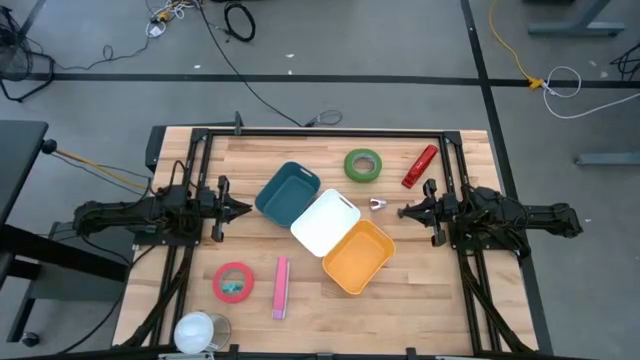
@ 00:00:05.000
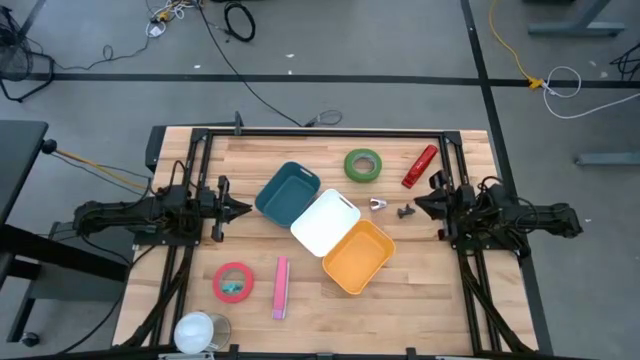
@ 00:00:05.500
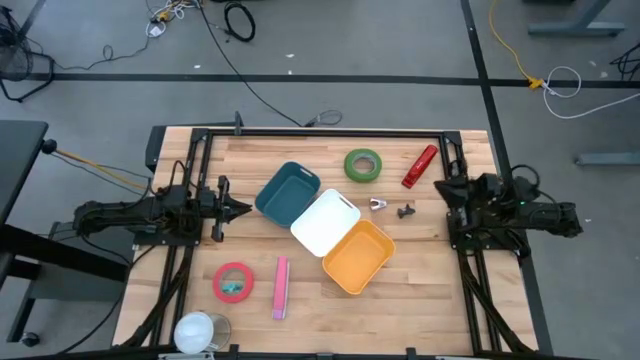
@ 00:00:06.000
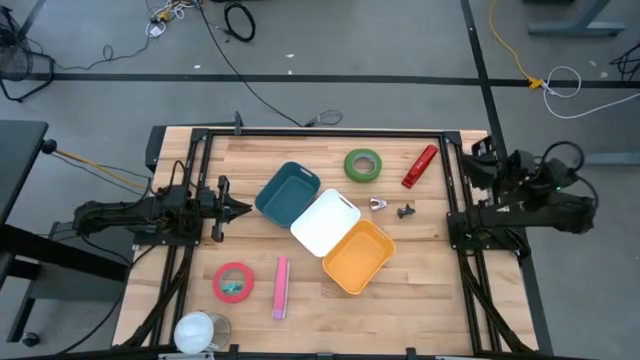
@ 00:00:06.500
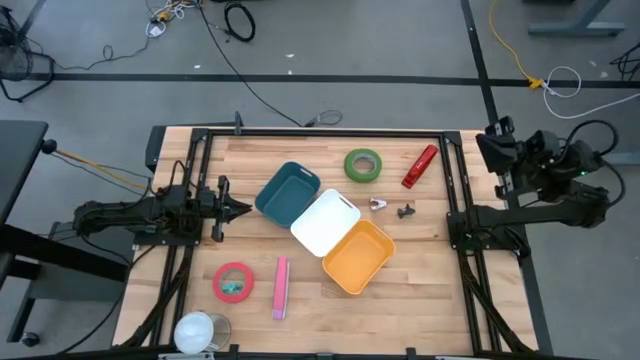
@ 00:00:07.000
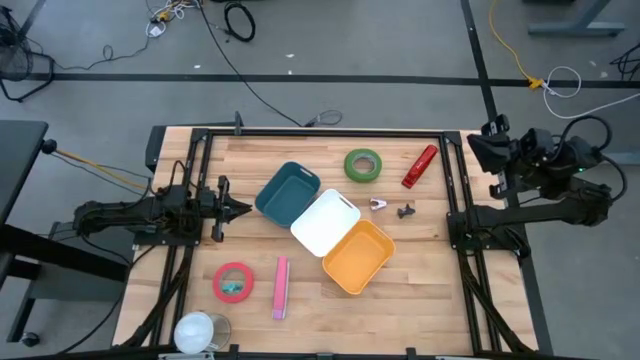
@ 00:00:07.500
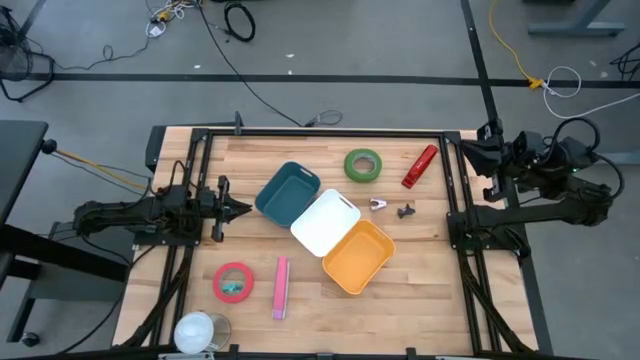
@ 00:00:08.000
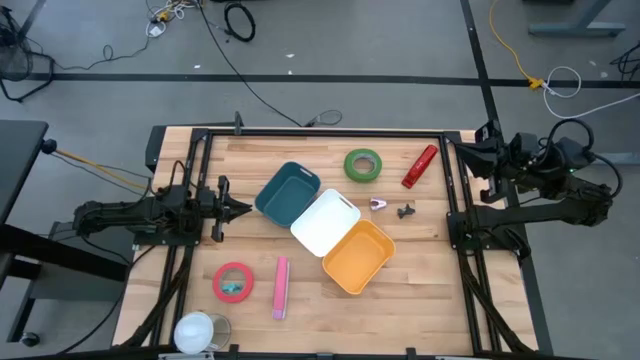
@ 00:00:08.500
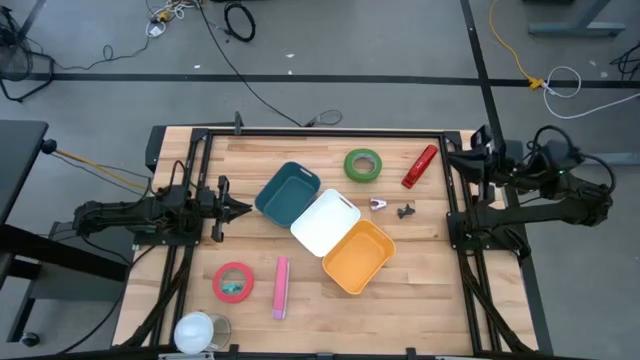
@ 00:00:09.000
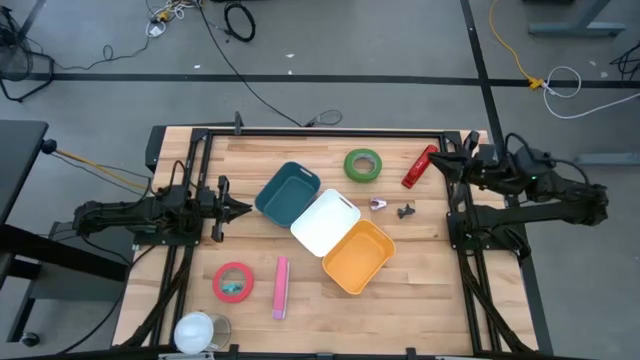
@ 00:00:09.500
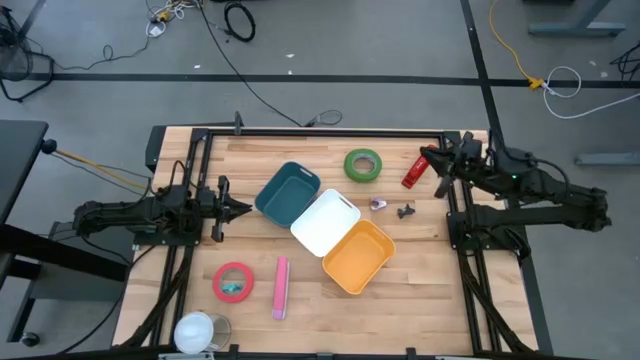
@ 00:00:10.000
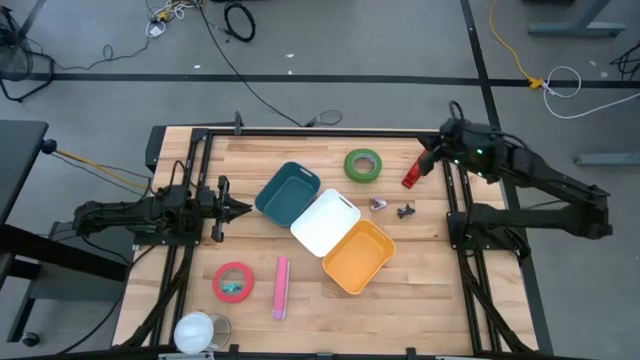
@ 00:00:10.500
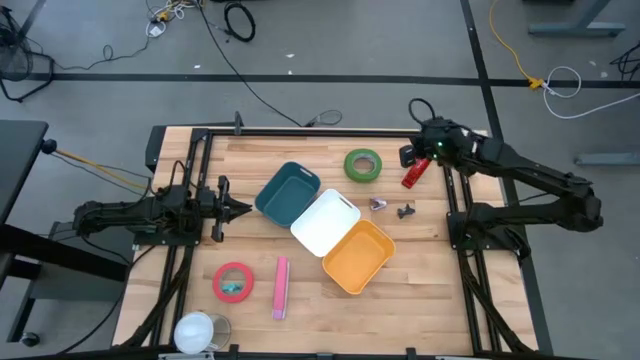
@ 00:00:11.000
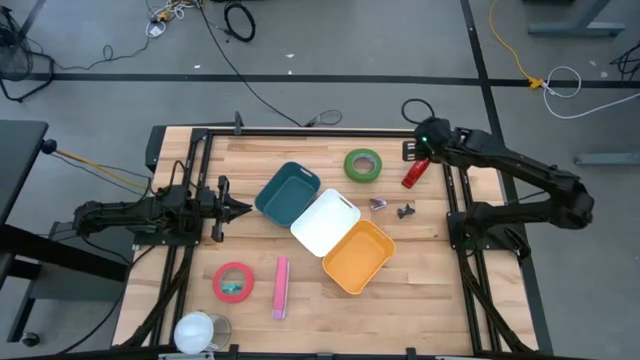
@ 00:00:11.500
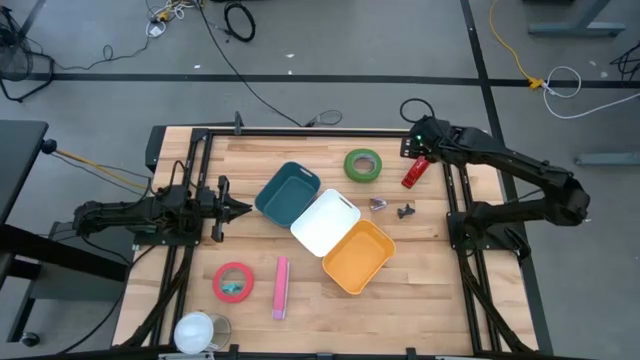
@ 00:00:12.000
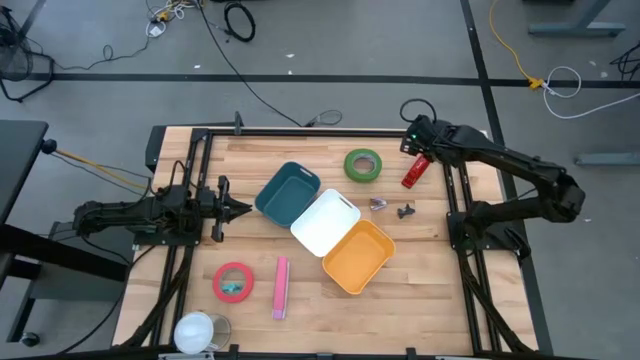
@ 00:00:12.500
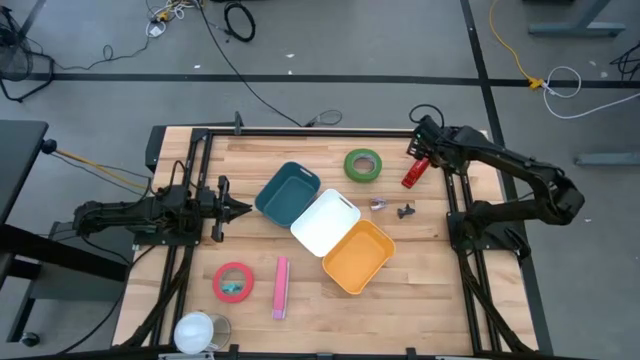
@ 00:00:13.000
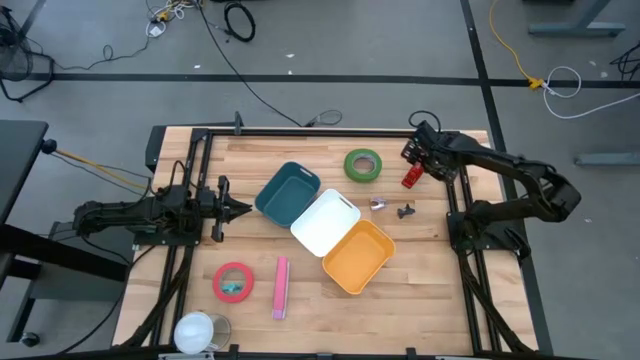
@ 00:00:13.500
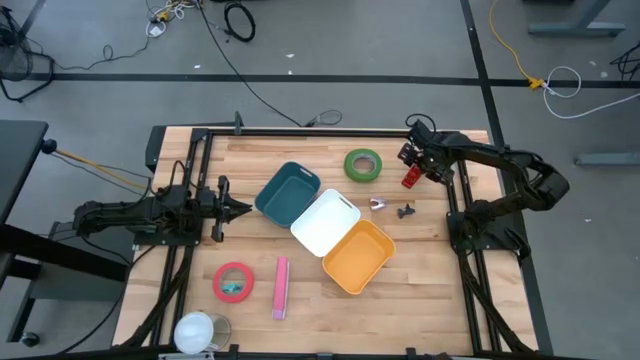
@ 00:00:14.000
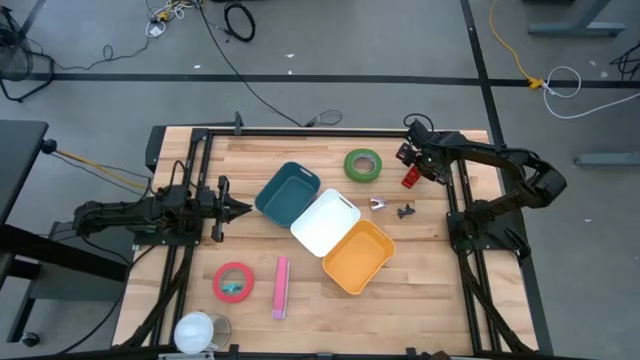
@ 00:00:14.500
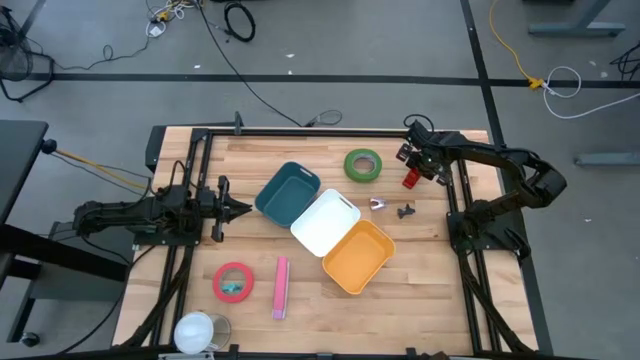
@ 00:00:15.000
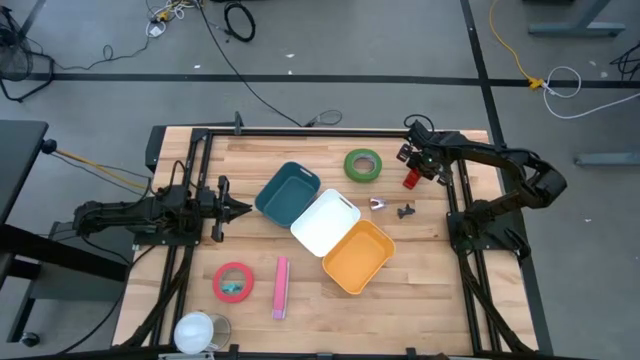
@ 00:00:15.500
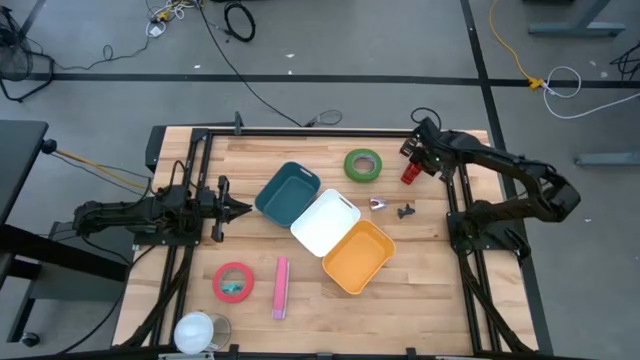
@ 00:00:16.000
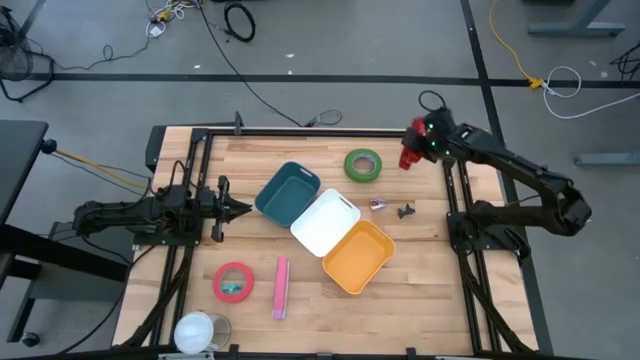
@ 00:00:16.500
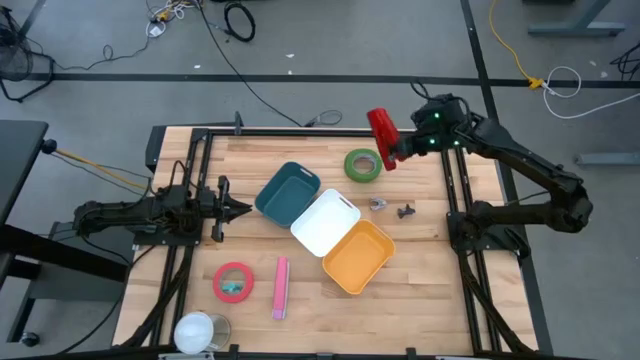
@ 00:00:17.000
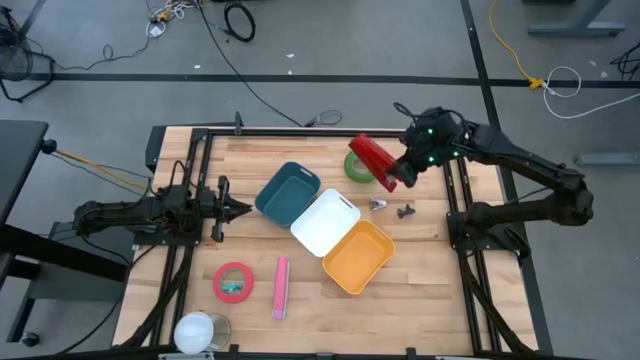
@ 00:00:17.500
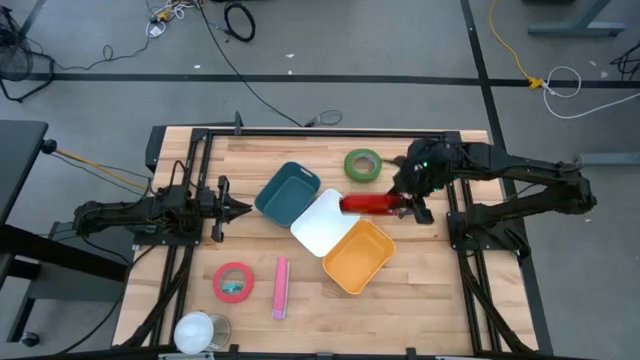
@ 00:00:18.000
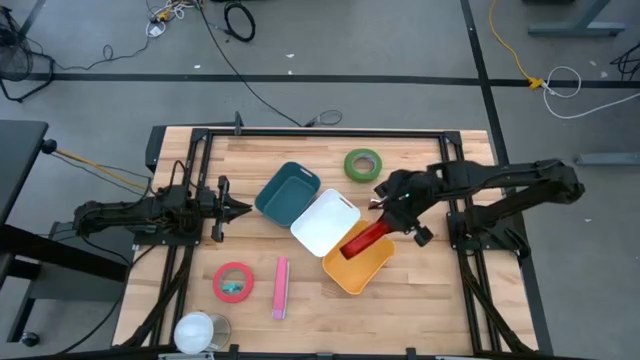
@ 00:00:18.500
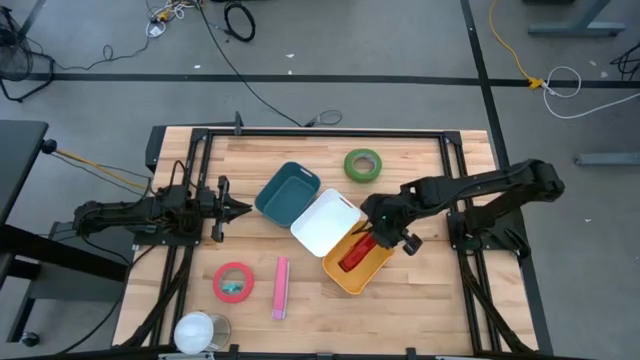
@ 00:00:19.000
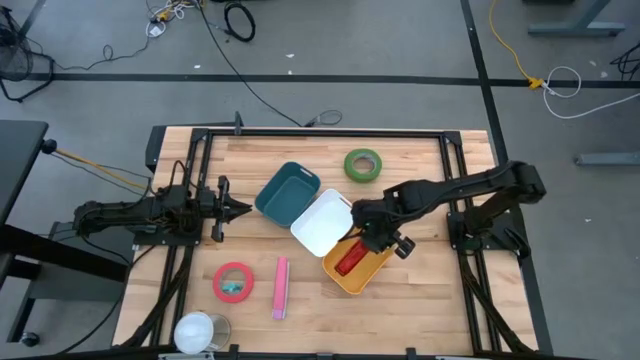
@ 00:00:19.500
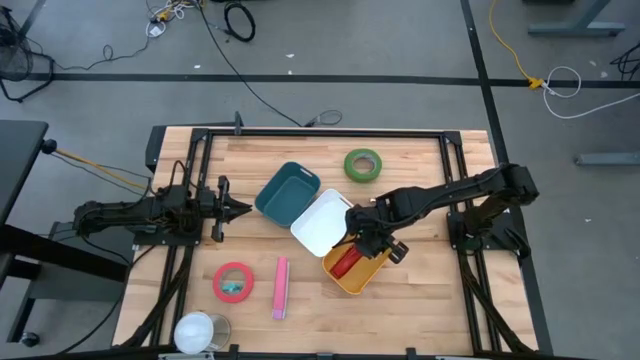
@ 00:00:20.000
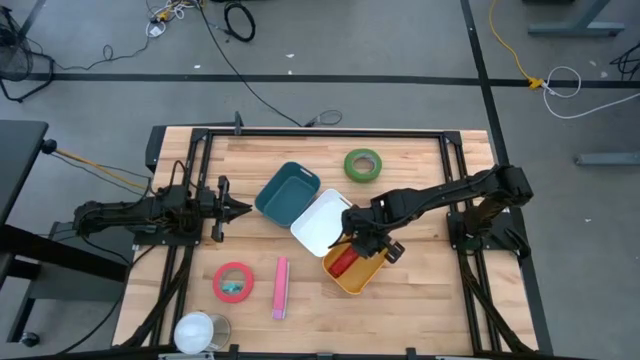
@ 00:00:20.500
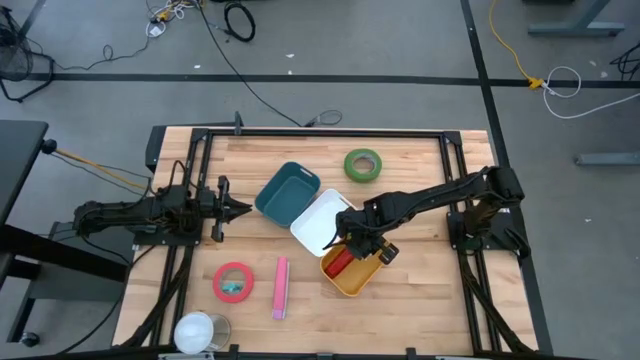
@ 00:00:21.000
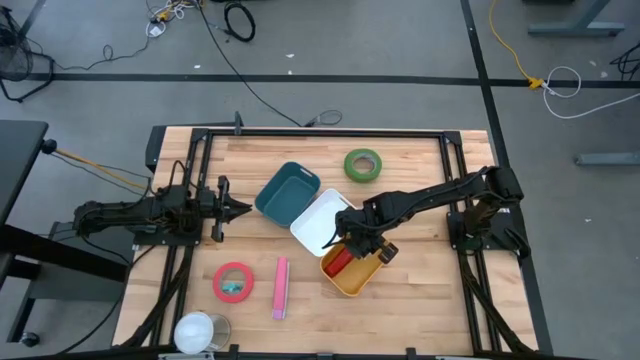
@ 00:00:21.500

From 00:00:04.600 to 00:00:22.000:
Task: Pick and place Stapler, Stapler remover, tape
Put the red stapler into the yellow bin

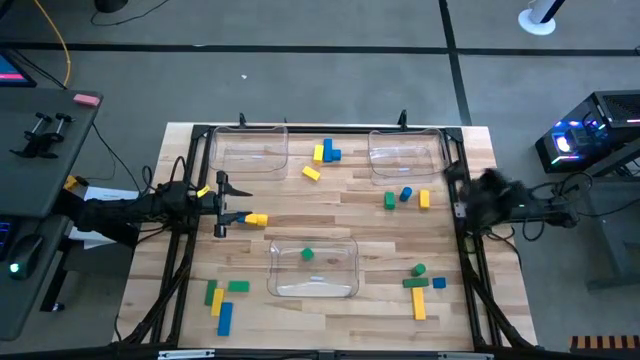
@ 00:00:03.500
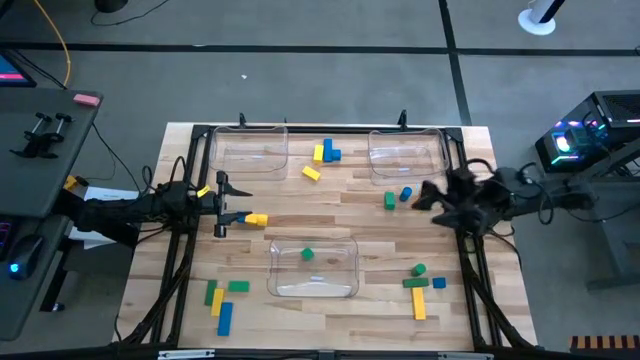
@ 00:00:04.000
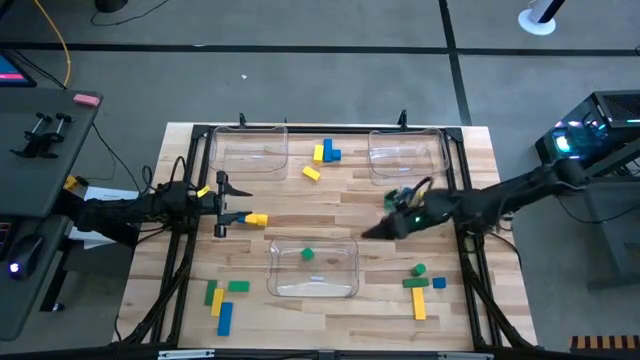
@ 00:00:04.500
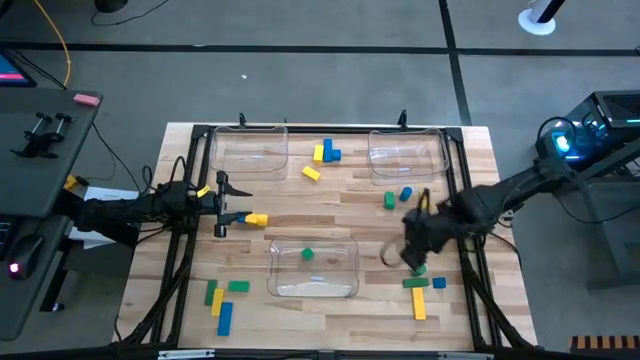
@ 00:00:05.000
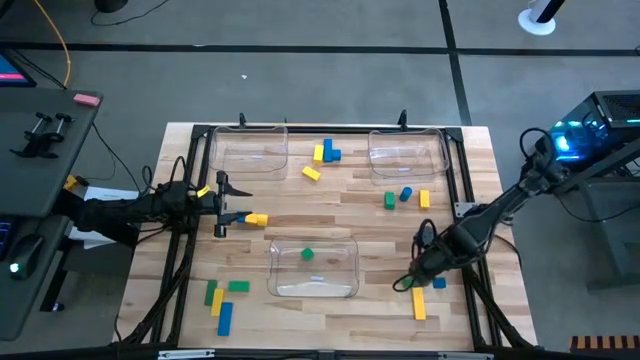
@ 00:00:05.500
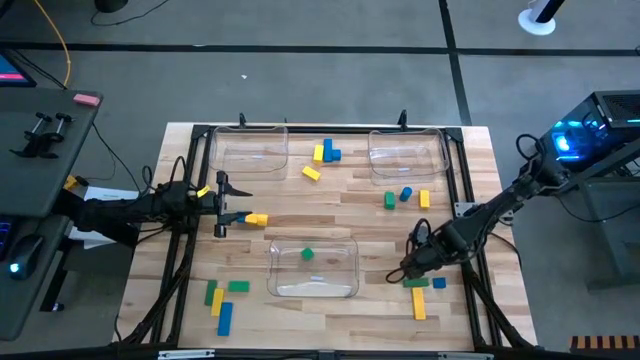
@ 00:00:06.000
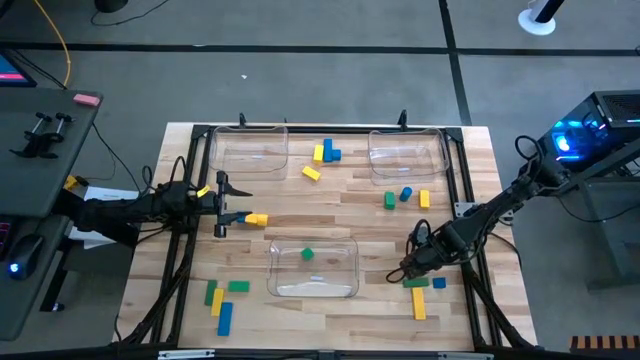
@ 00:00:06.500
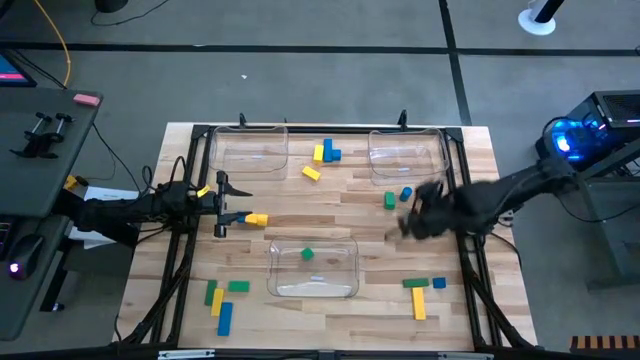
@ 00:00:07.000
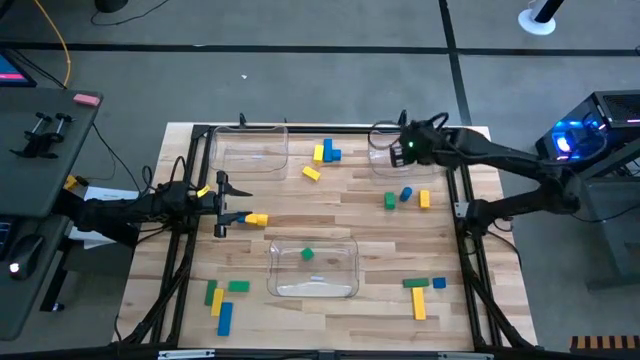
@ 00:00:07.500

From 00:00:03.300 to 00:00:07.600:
Task: Sort blocks
Put the green block into the top right transparent bin

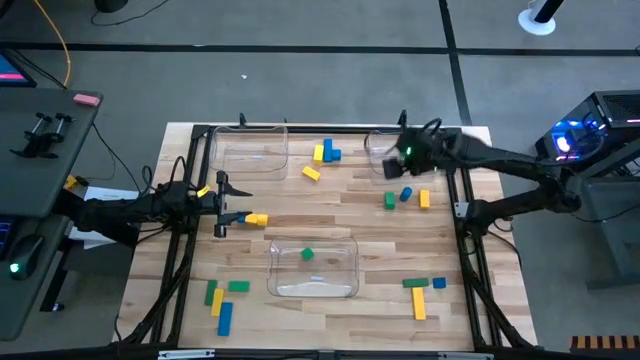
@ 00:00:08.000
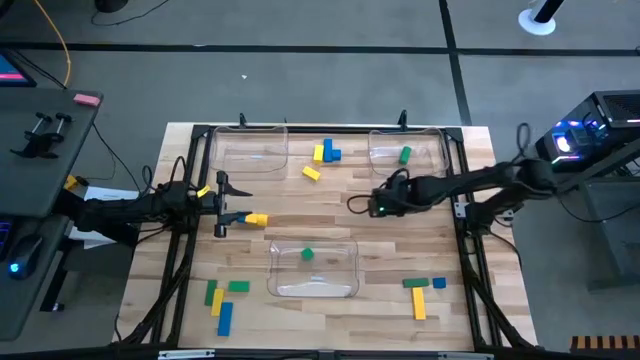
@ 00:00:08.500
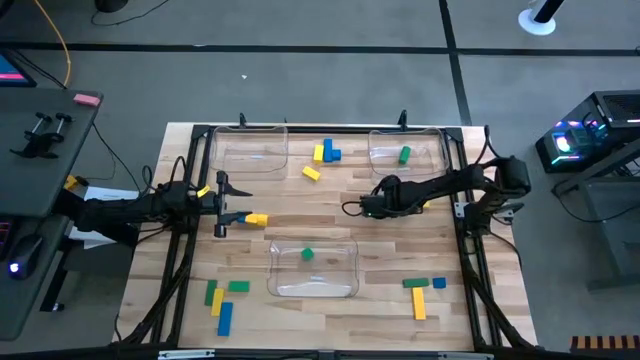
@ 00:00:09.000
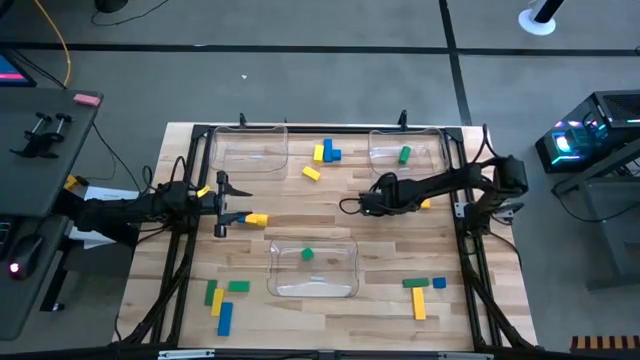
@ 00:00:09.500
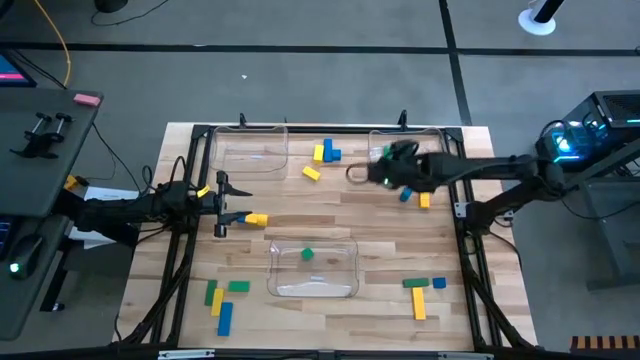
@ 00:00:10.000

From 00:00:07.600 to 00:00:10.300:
Put the green block into the top right transparent bin
